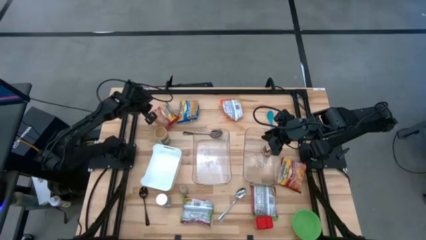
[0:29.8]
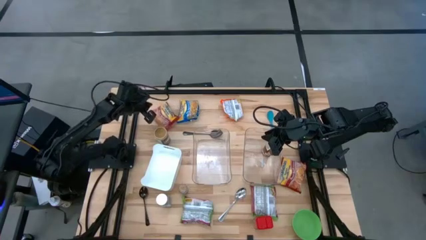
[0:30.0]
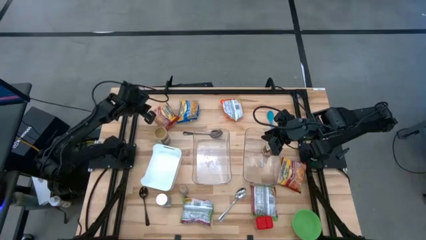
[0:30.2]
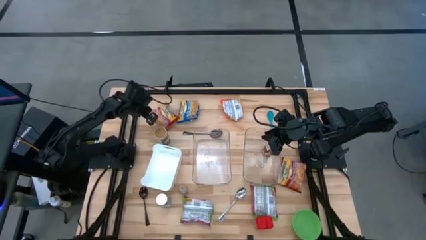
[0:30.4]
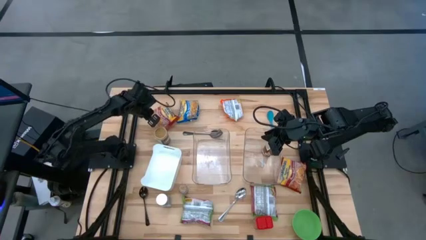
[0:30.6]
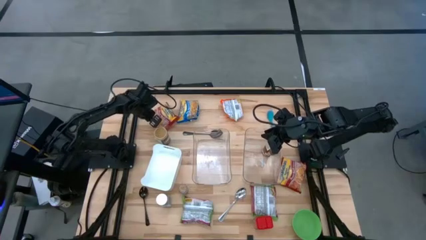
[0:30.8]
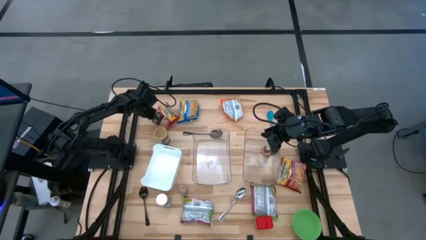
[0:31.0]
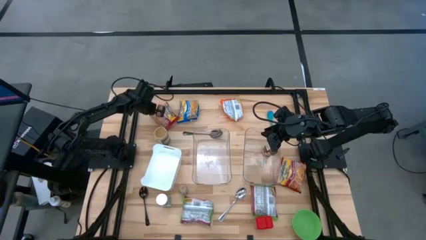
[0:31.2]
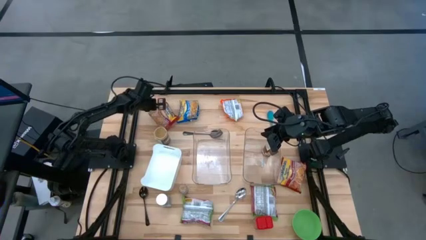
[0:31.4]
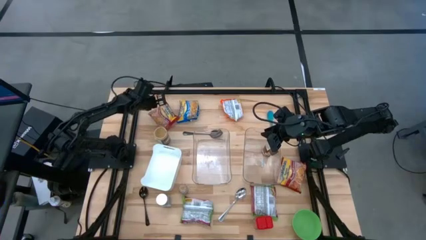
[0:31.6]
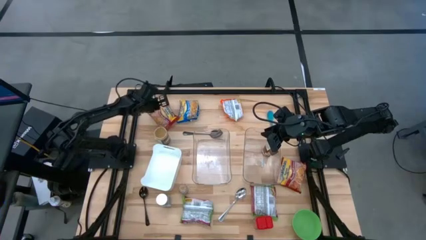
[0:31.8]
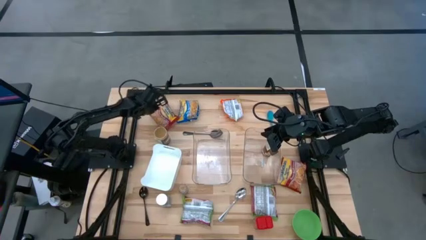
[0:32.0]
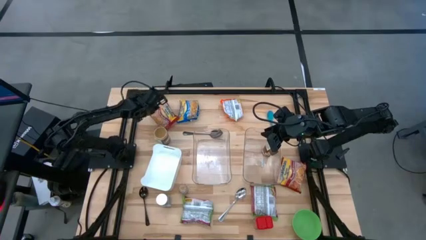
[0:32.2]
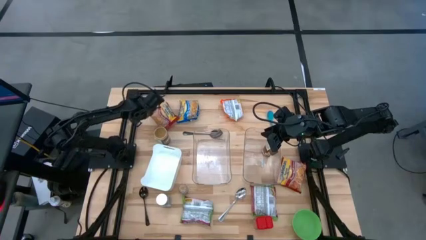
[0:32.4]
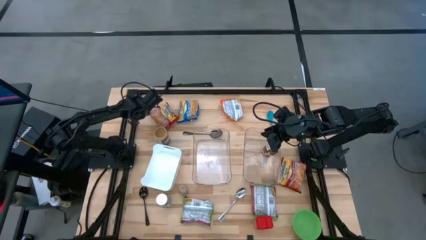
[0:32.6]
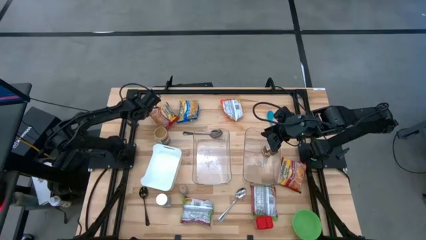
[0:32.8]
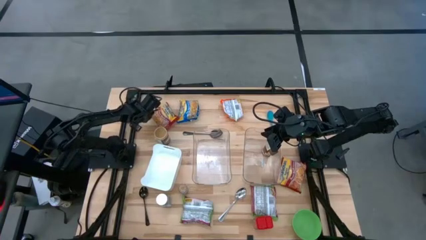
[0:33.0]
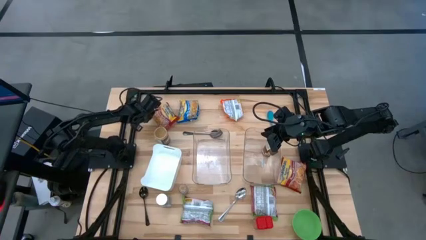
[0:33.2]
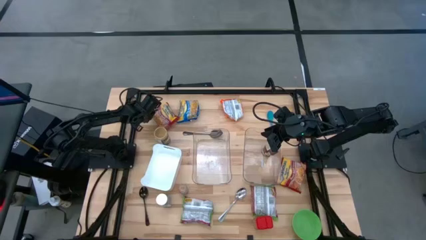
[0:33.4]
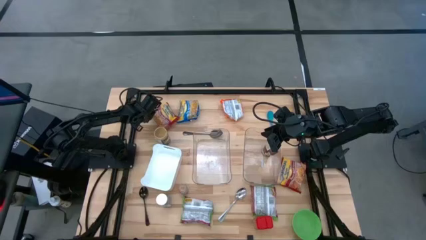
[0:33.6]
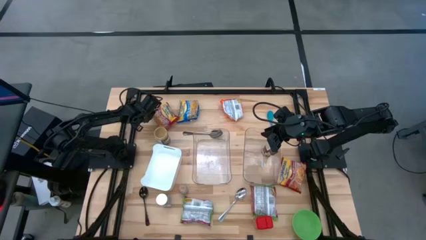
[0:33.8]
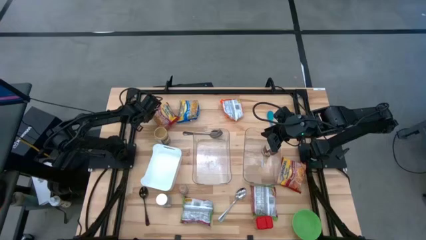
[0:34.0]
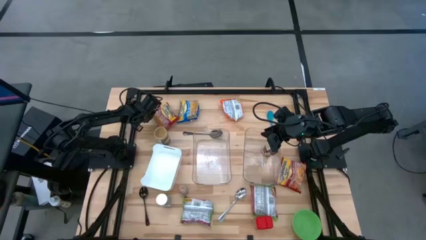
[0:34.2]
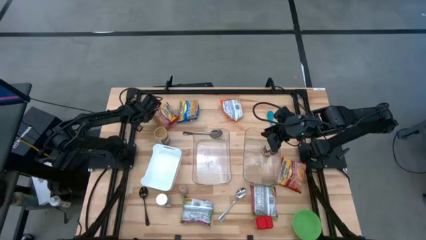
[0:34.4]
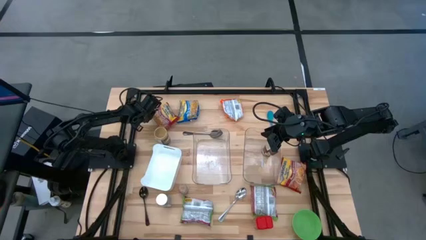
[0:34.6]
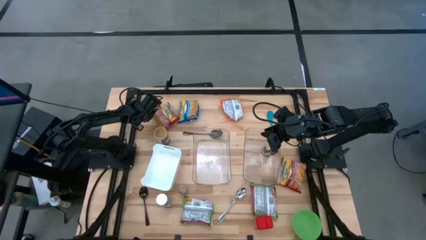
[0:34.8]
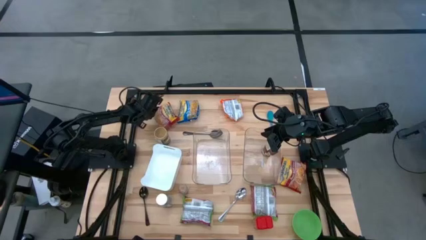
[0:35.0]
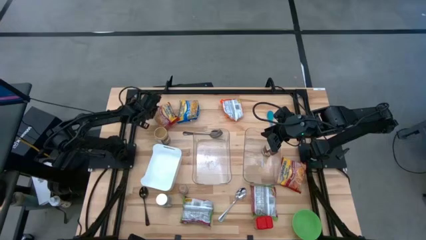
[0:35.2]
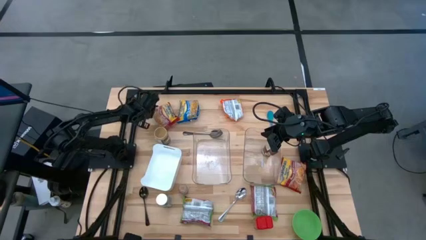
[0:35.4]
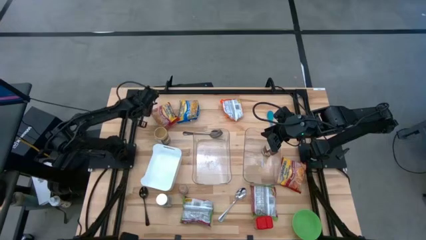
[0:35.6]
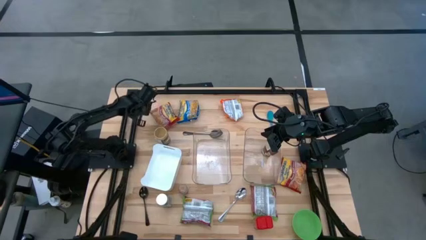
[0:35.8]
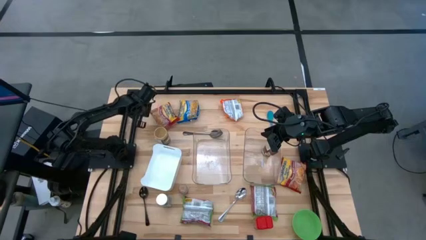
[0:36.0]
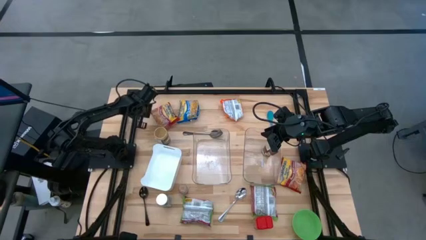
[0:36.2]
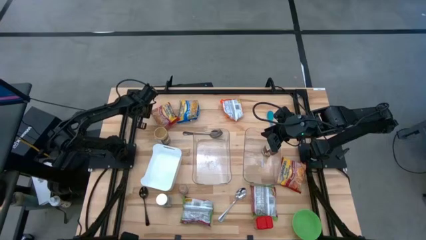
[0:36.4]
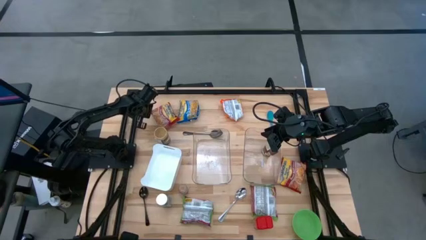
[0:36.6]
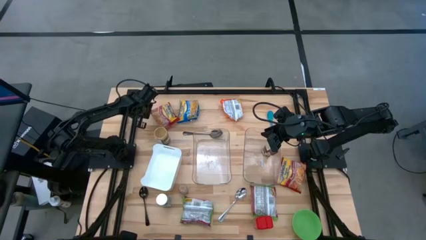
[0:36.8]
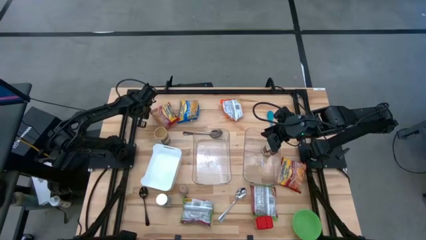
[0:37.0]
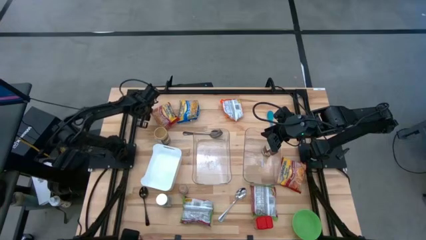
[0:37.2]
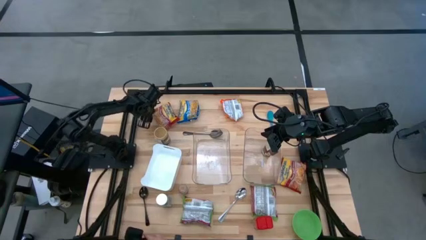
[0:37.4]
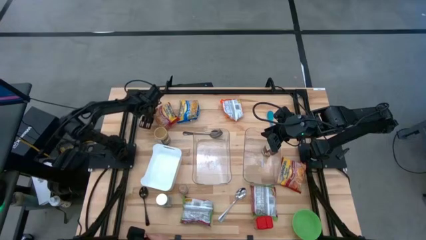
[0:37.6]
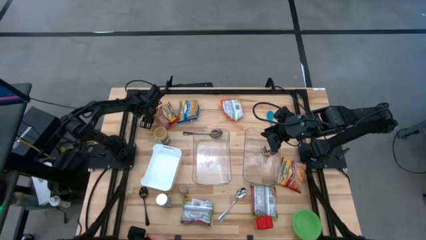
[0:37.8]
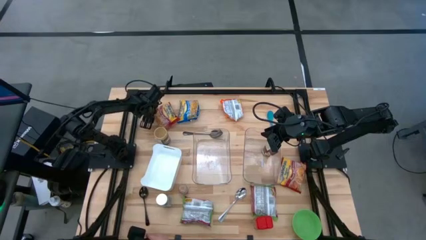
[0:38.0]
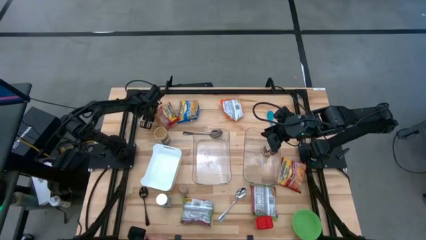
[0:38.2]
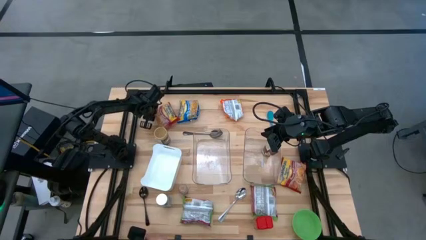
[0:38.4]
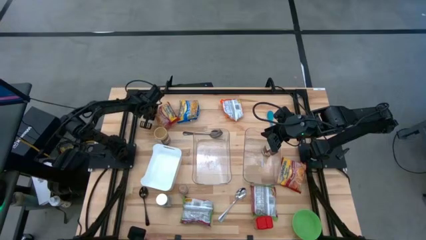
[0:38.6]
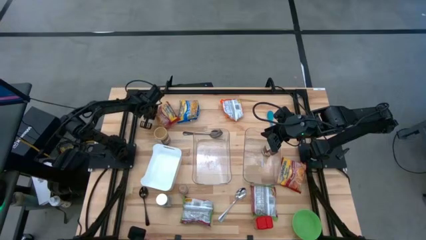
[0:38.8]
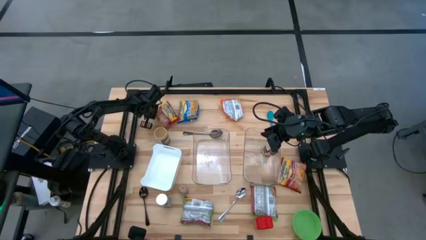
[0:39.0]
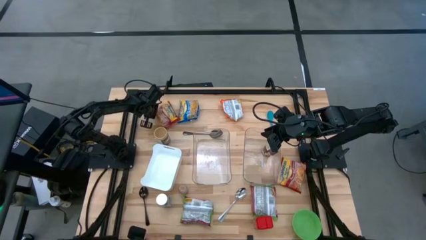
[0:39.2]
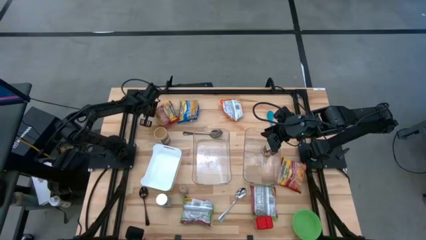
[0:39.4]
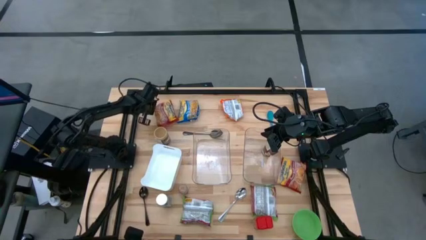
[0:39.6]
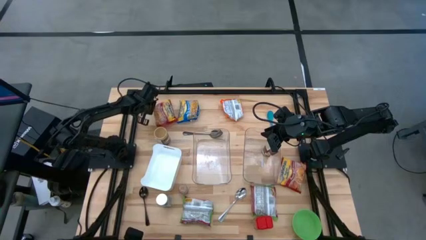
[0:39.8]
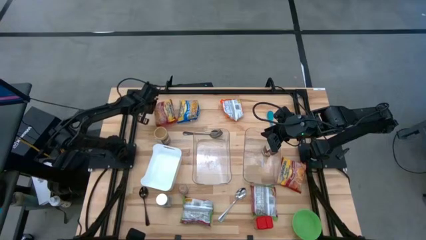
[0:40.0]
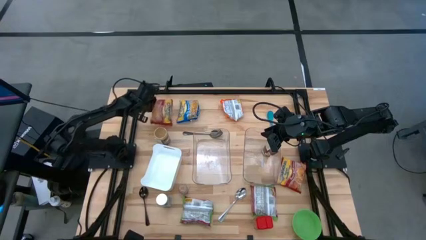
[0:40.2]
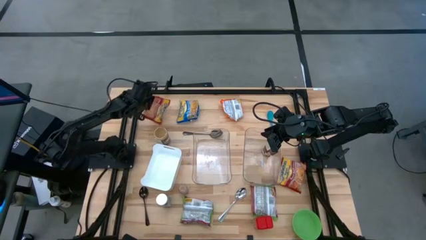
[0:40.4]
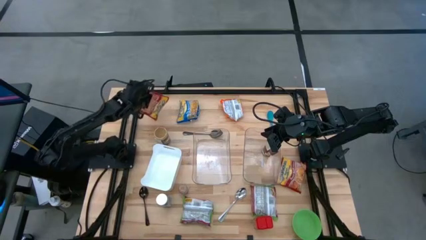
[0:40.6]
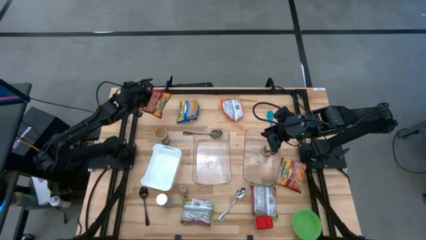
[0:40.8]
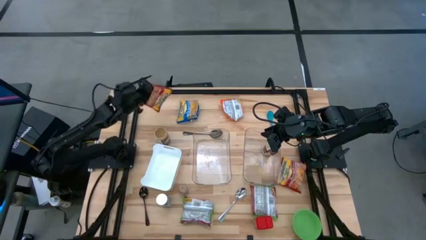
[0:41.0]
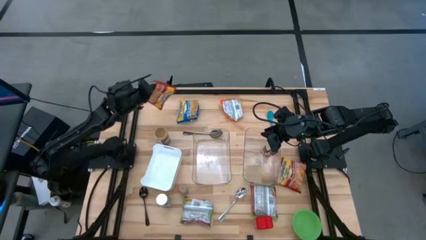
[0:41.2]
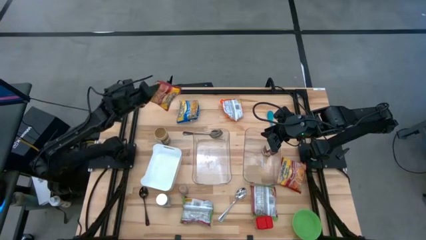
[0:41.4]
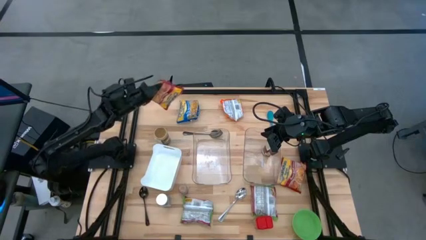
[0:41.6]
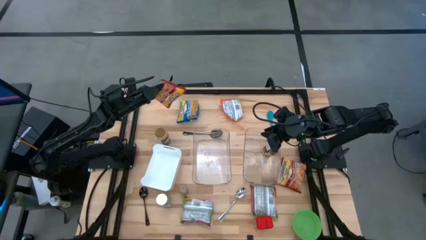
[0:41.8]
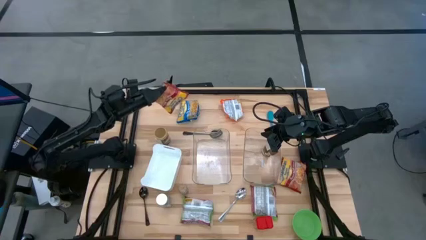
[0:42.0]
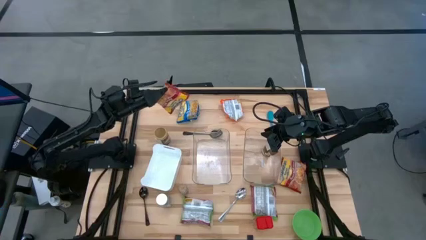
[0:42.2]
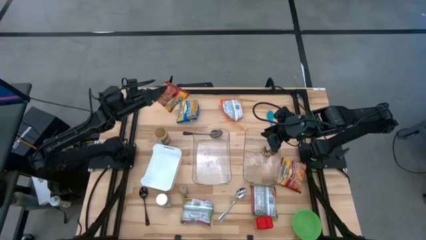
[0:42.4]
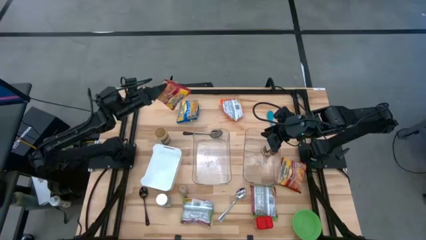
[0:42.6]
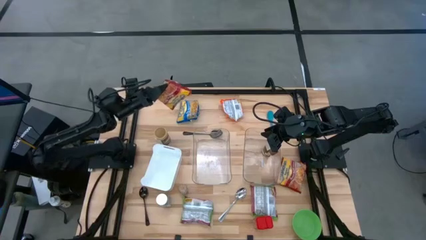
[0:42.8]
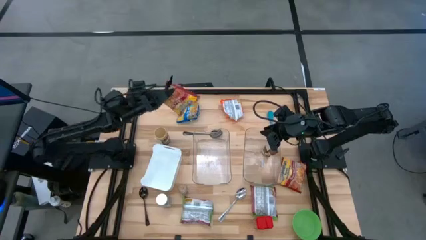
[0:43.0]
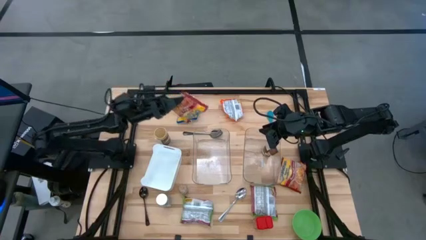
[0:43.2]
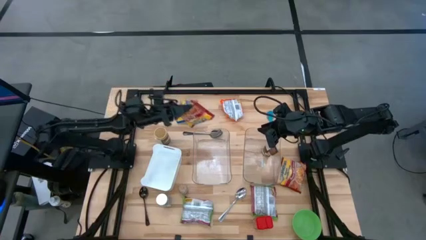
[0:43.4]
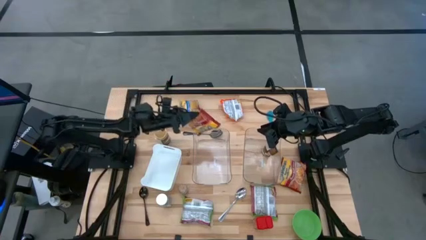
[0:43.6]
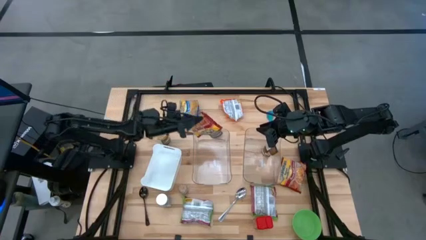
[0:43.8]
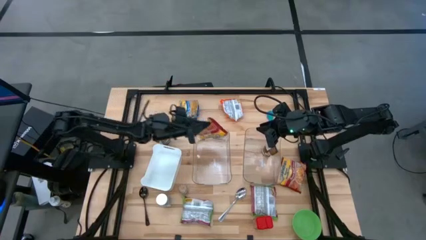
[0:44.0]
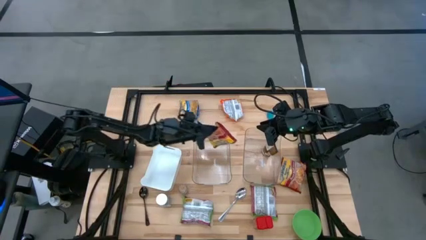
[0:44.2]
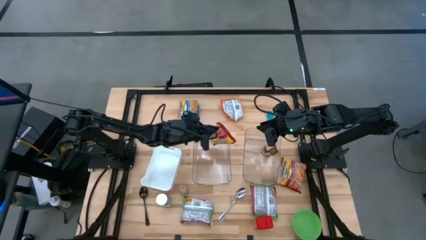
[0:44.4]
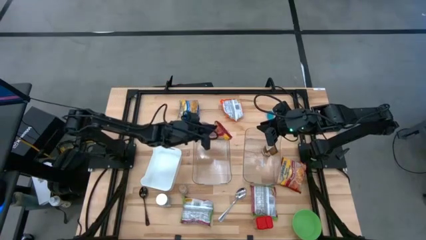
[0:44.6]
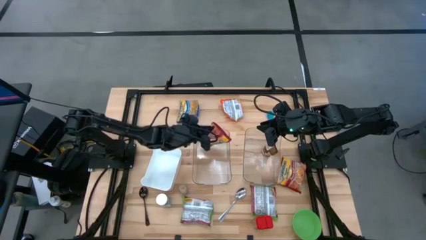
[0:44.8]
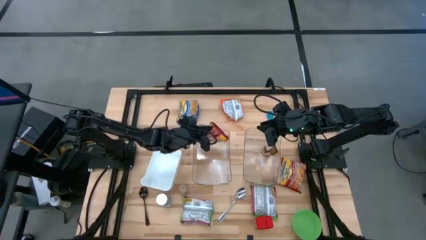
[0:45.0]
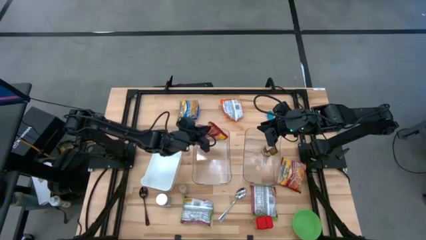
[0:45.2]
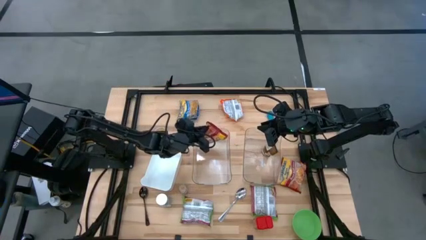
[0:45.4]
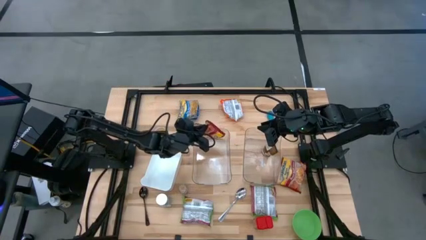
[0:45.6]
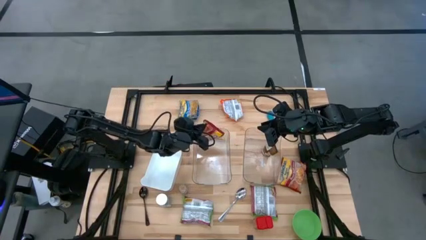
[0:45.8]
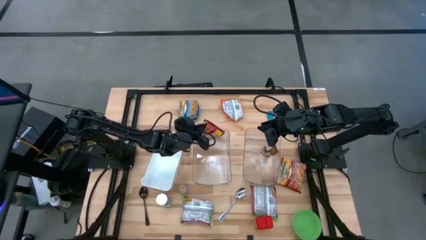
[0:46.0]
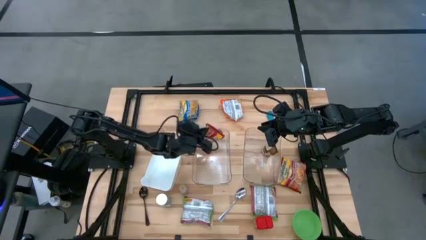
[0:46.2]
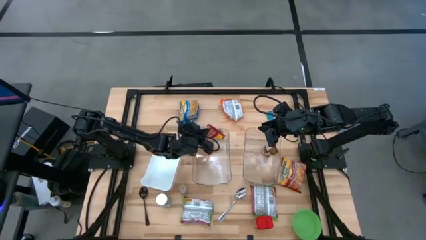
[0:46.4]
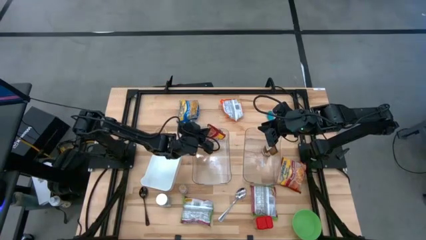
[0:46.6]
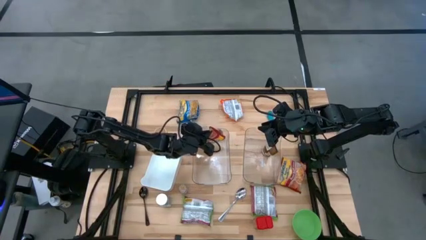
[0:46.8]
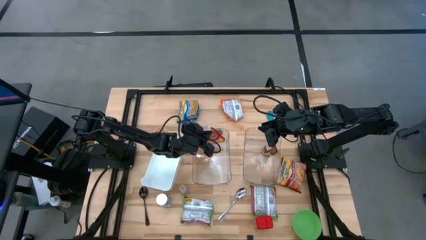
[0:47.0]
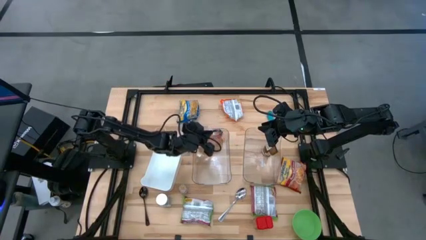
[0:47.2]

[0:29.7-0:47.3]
Task: Pick & Place Food Item
Put the top red noodle pack into the left transparent bin
